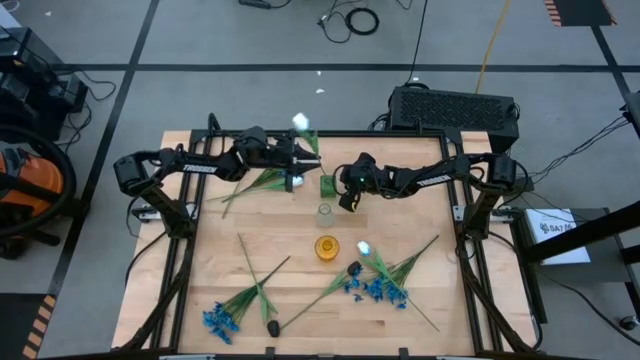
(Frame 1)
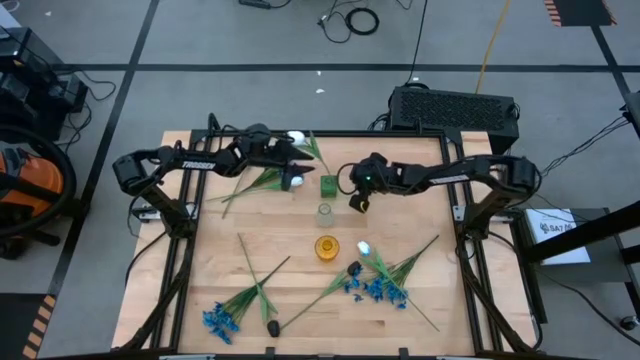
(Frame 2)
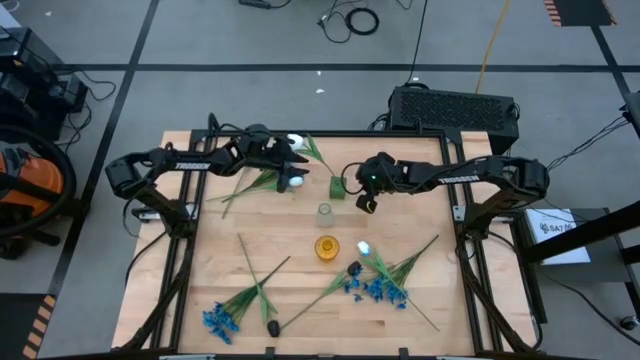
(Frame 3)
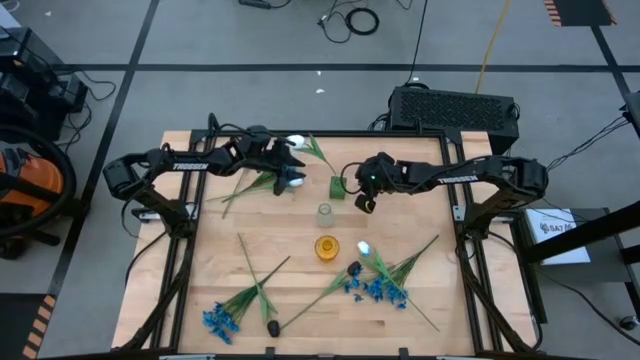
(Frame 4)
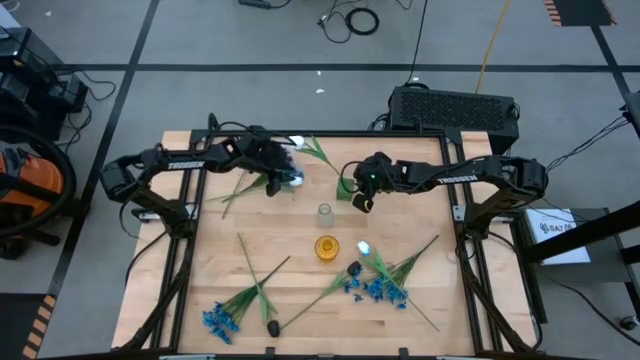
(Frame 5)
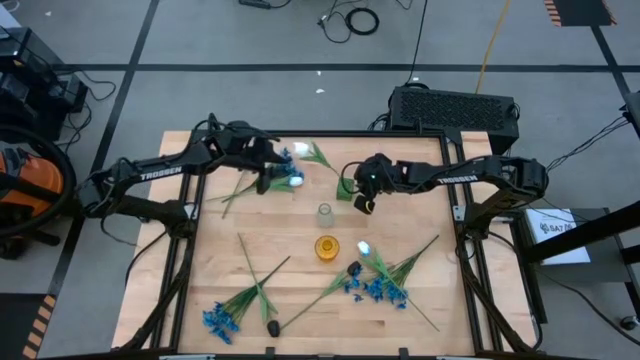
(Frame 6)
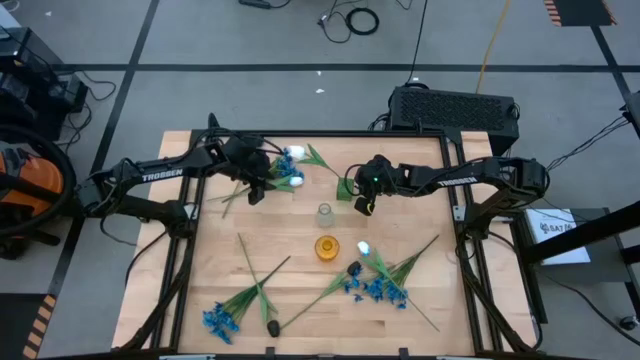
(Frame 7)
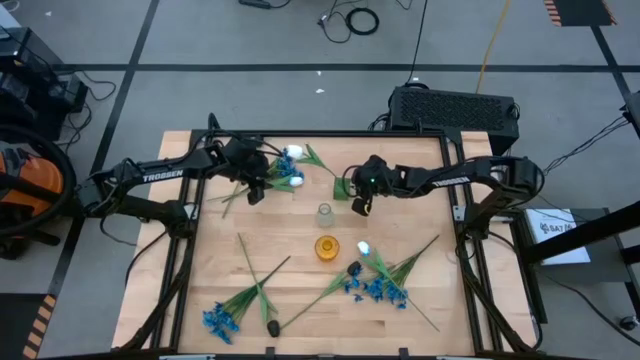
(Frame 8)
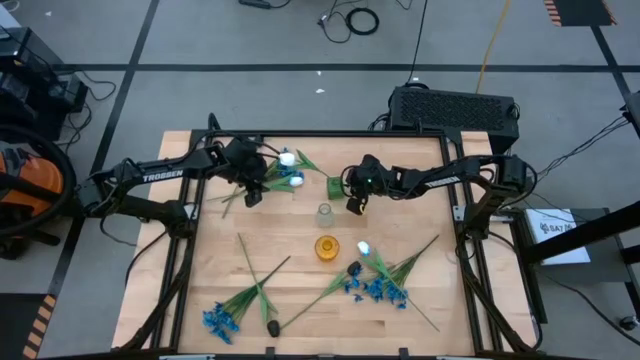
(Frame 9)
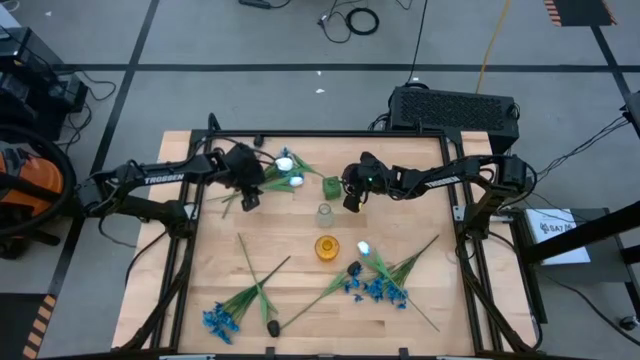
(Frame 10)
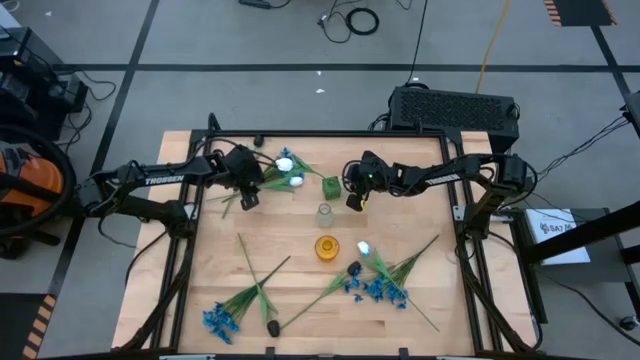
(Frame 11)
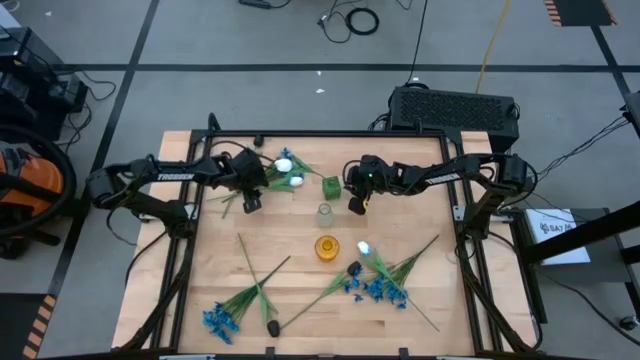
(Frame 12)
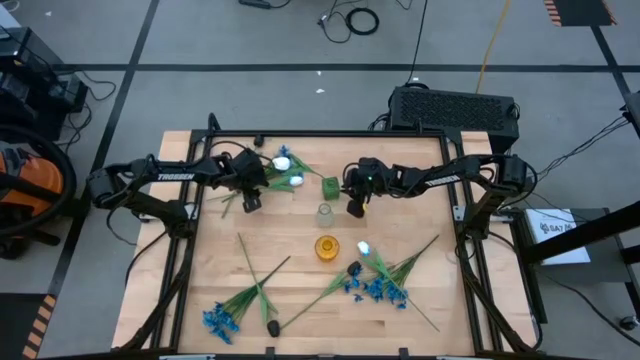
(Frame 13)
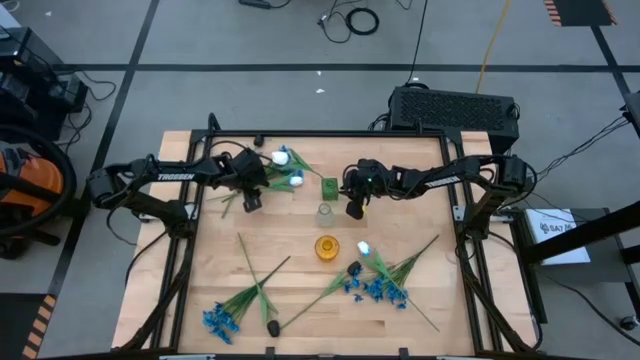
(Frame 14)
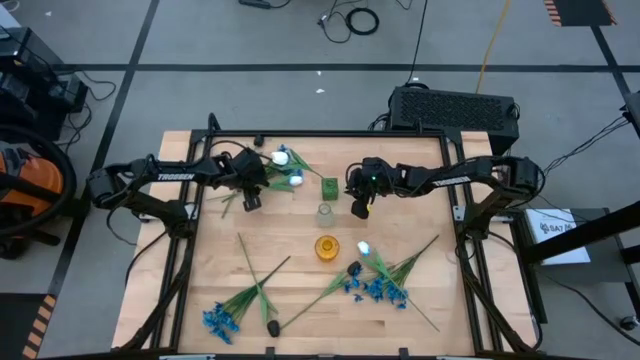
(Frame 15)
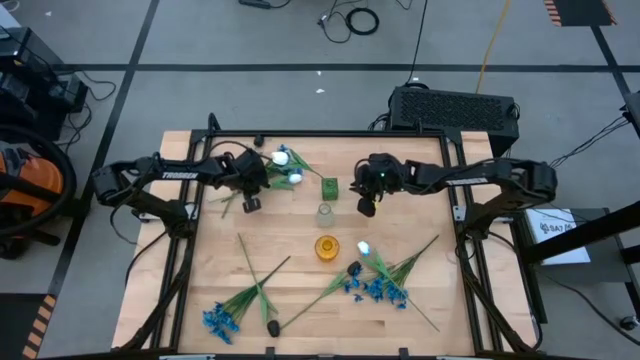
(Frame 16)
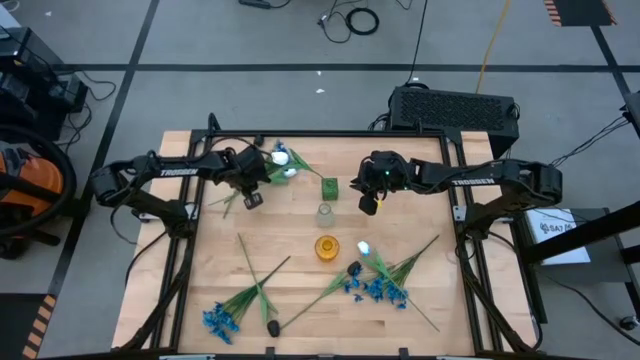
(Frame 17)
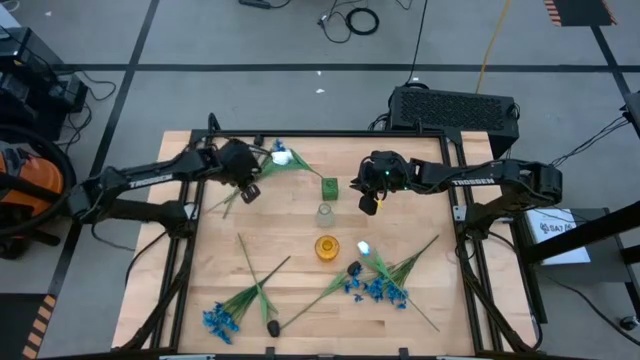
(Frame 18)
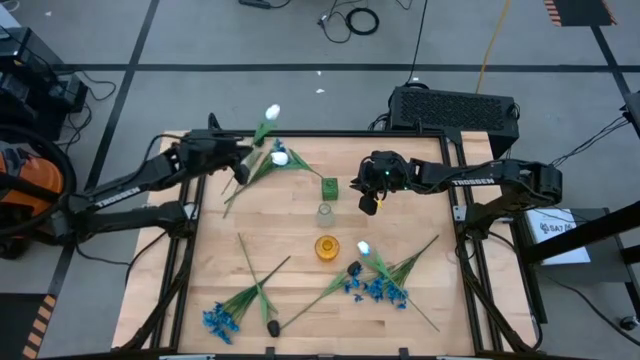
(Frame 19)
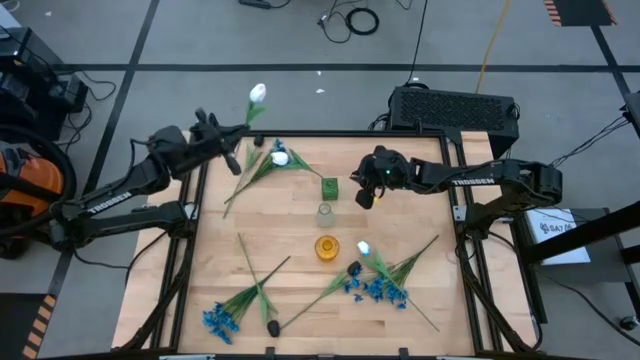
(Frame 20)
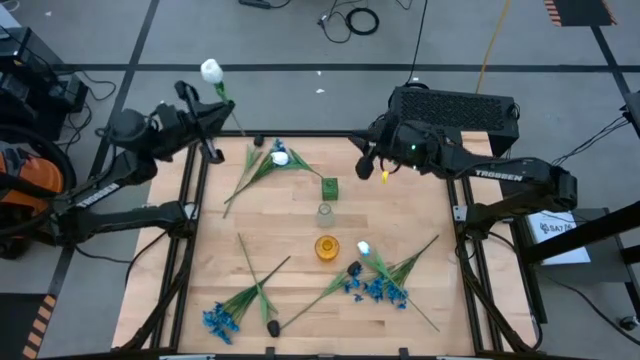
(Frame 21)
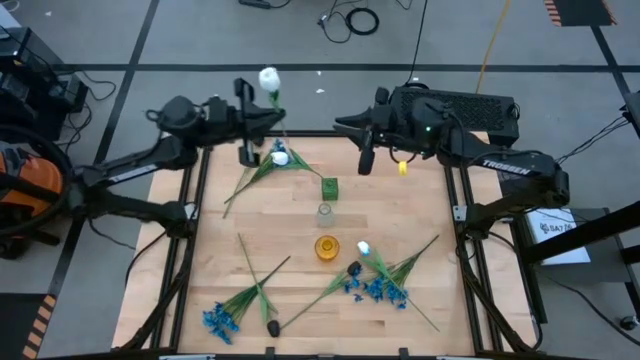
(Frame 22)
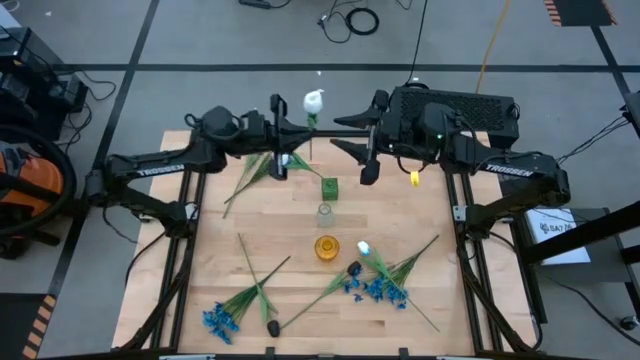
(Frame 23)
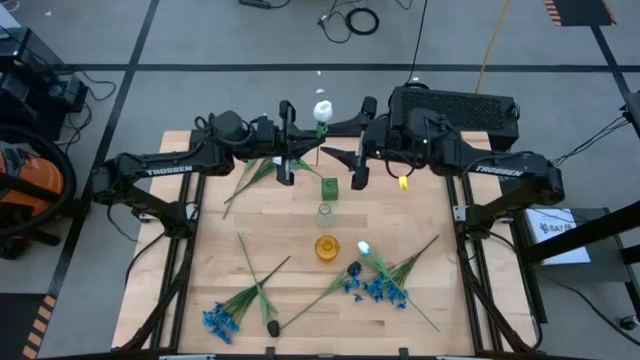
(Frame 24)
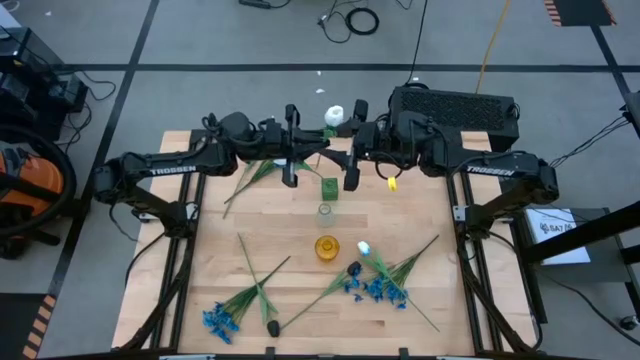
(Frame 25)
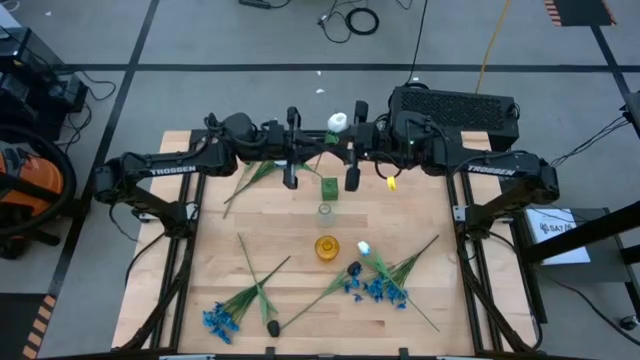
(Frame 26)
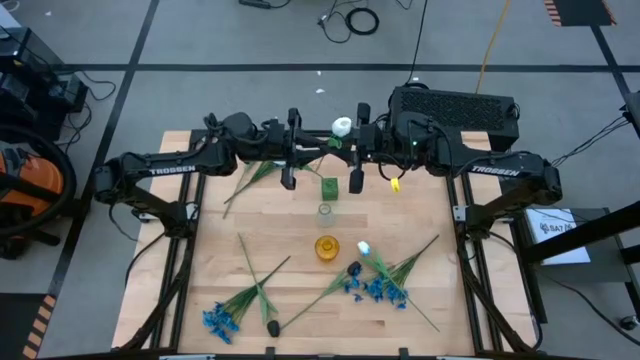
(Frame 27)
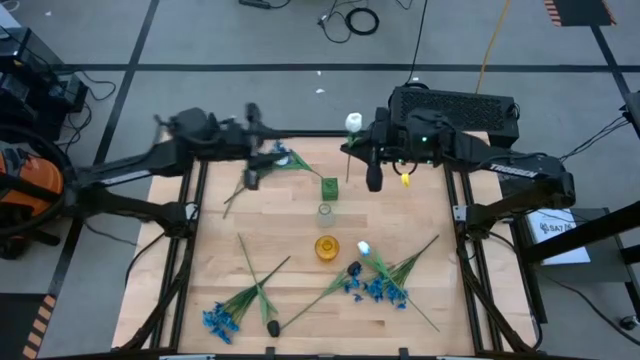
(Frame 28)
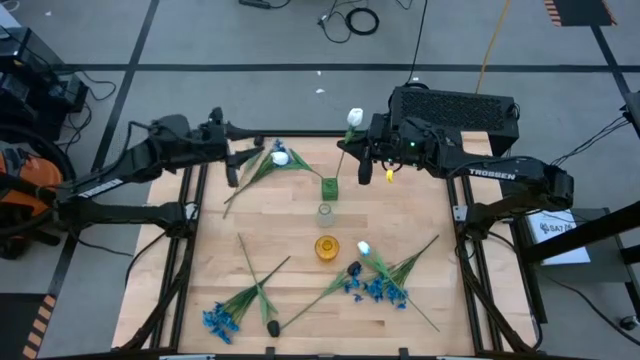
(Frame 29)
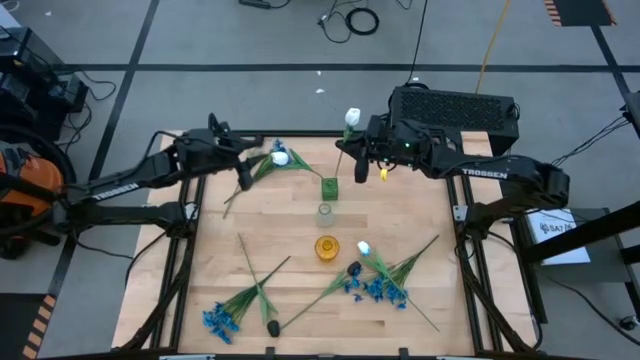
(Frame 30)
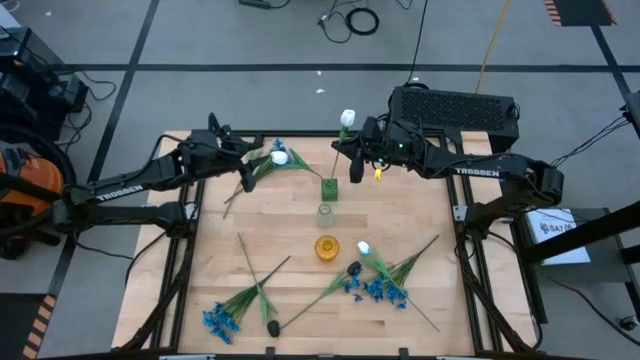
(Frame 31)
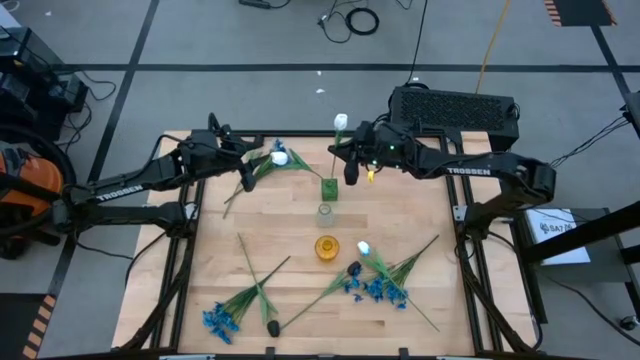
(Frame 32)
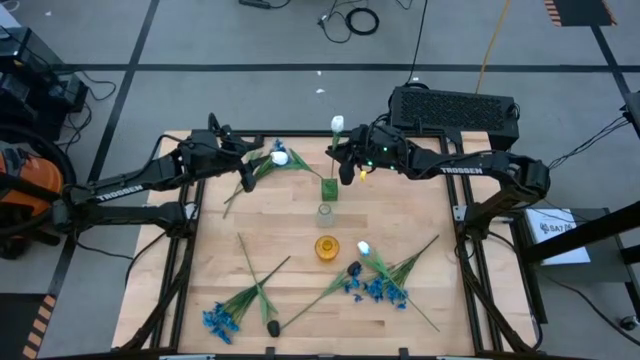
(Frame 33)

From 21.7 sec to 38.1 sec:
Task: Sort flowers into vase by color
Put the top white flower into the green vase

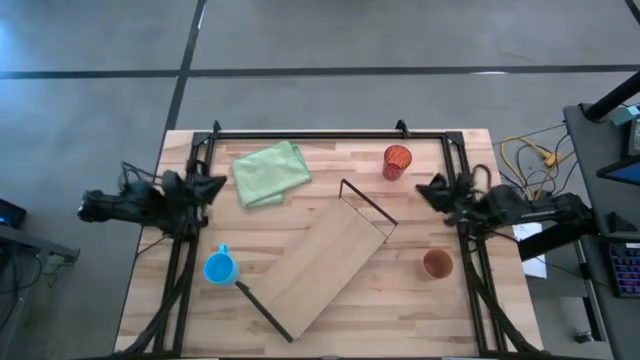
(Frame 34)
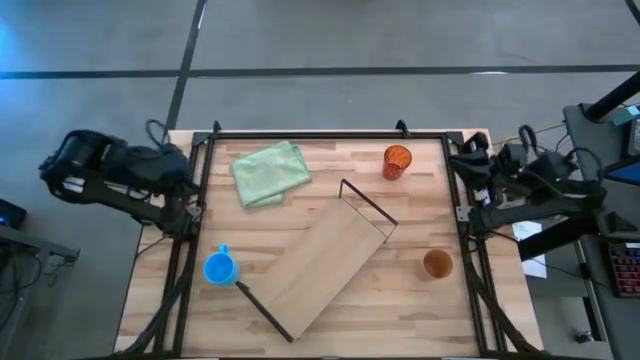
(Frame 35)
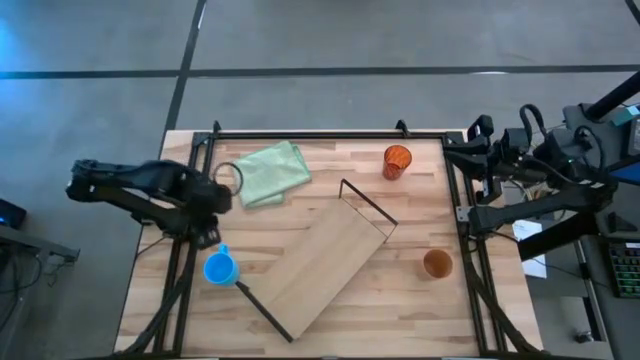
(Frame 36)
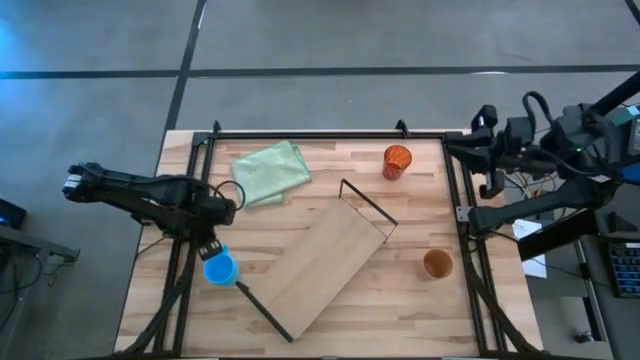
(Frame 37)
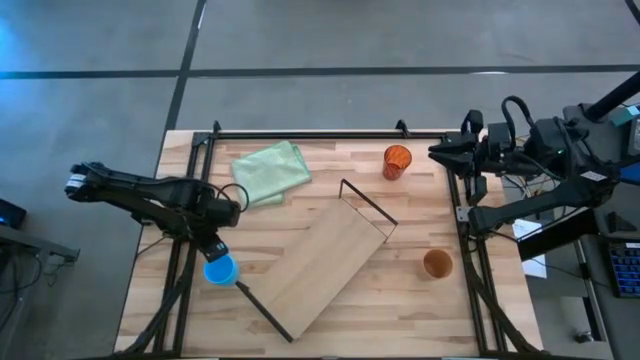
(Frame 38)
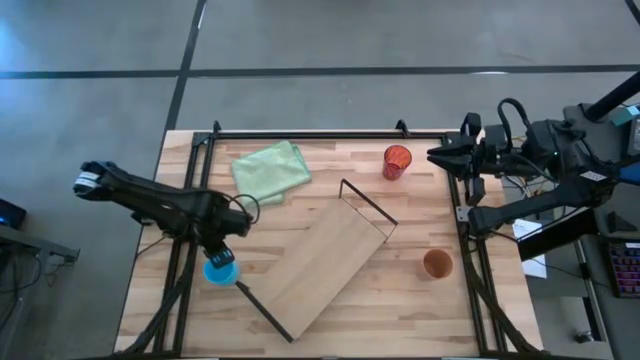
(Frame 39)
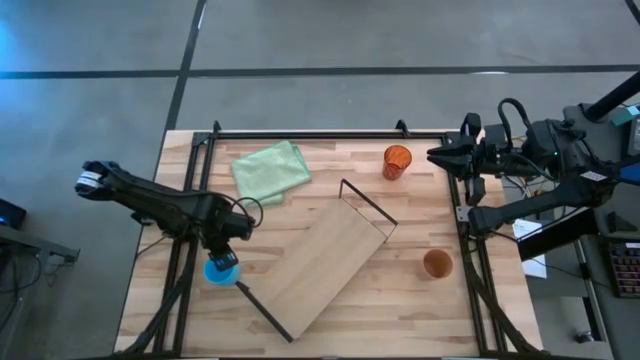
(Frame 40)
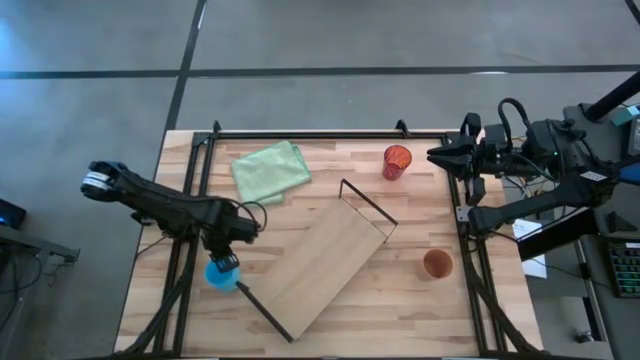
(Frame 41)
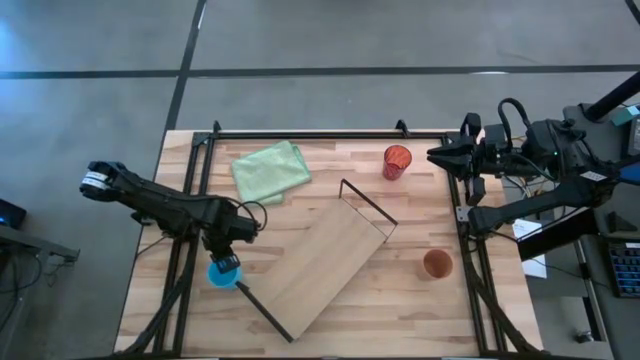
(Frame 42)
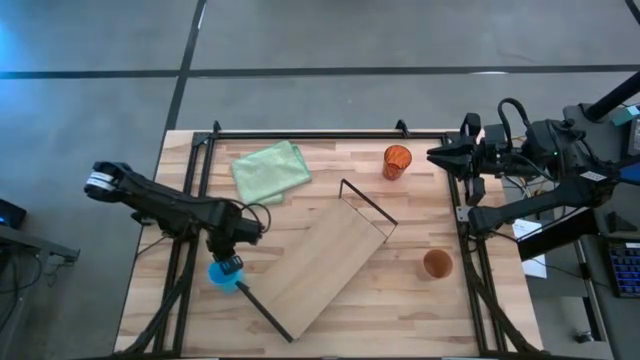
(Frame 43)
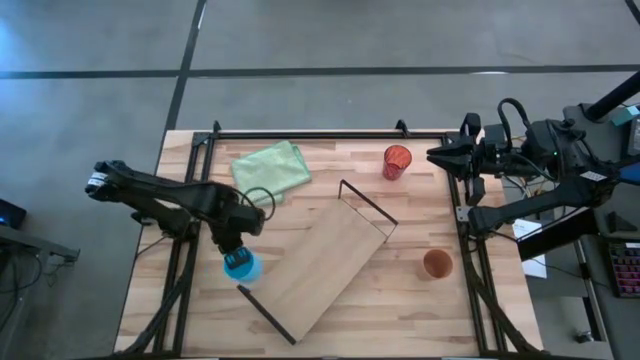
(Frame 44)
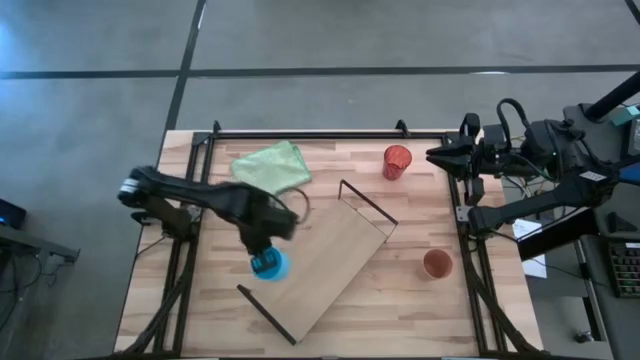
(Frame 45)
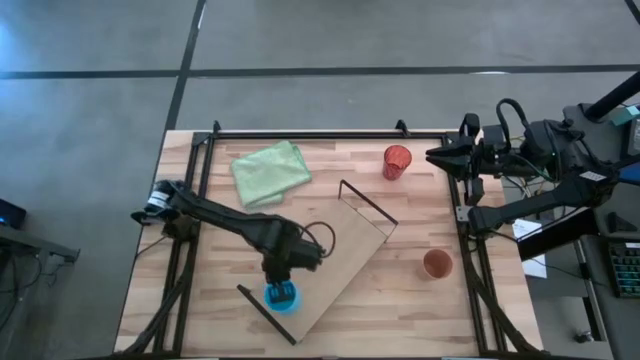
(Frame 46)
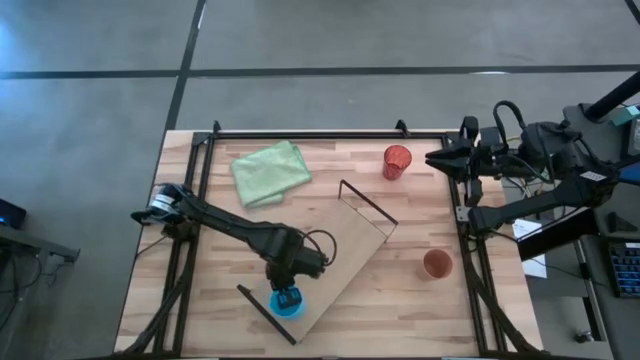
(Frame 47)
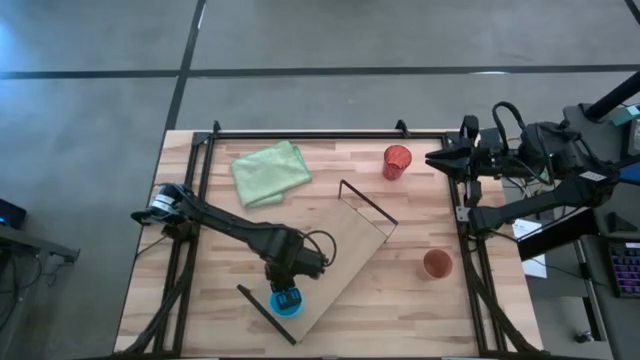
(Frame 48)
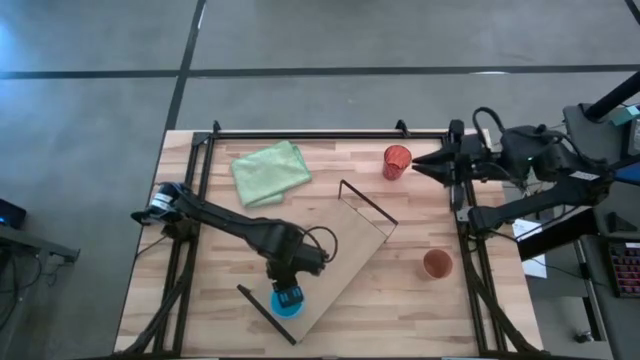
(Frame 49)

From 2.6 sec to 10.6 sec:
Task: Stack small to large cups/mugs on shelf
Put the blue mug on the shelf
